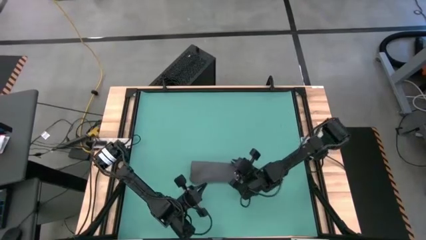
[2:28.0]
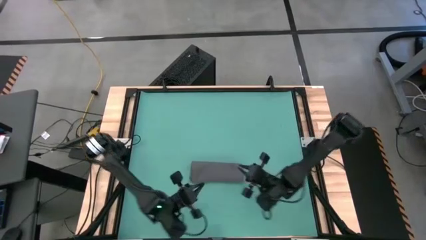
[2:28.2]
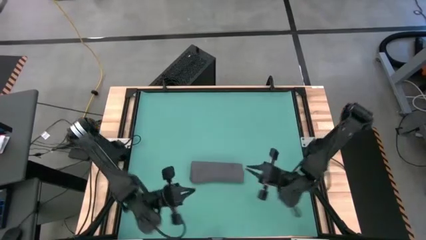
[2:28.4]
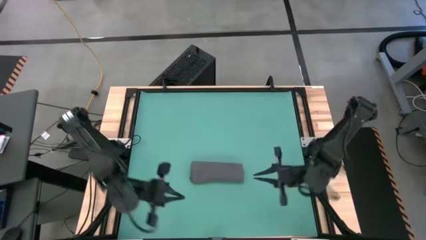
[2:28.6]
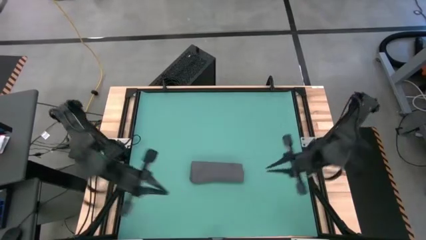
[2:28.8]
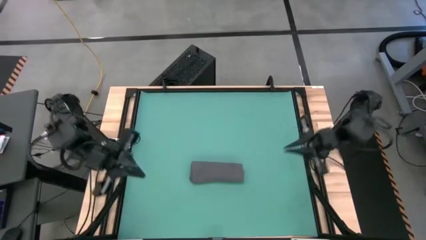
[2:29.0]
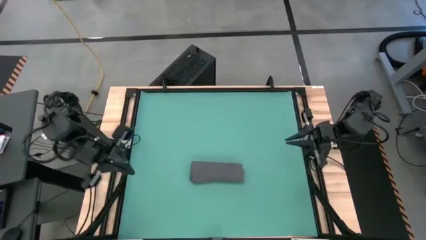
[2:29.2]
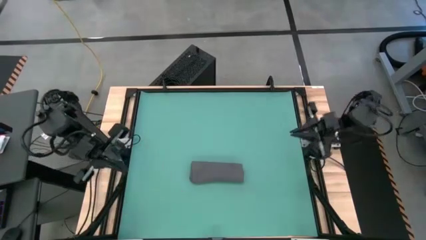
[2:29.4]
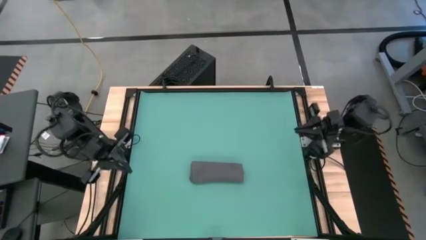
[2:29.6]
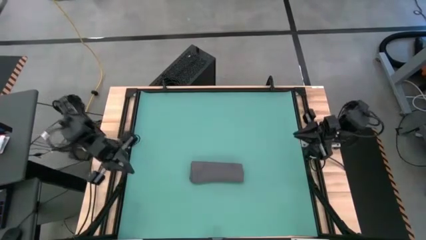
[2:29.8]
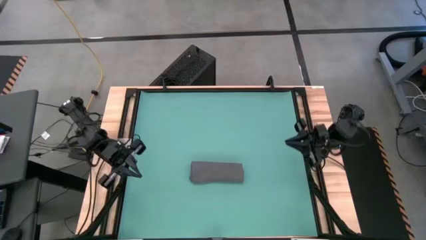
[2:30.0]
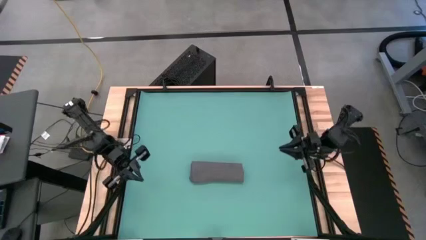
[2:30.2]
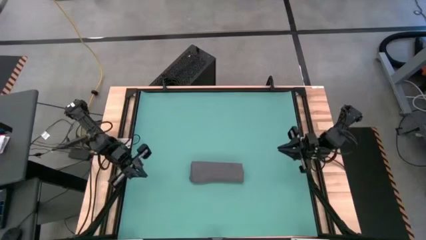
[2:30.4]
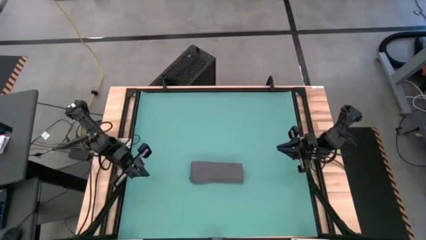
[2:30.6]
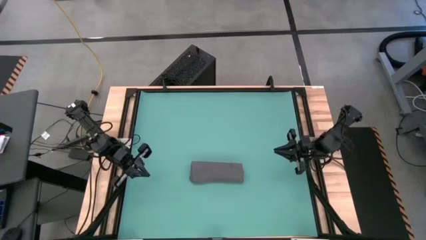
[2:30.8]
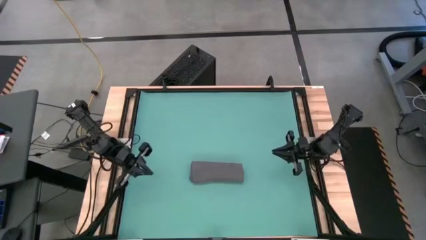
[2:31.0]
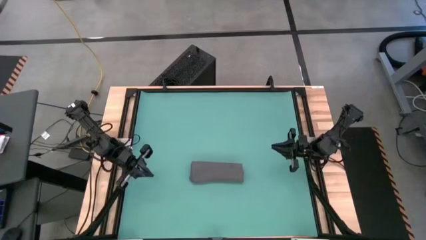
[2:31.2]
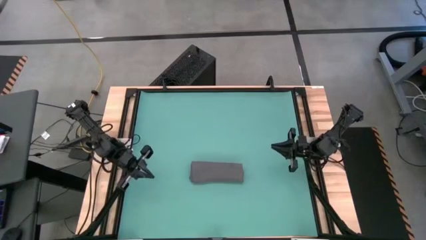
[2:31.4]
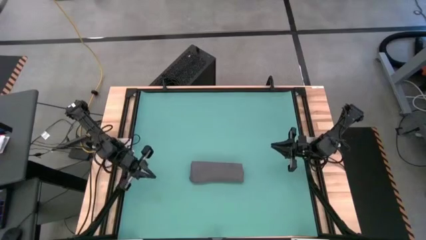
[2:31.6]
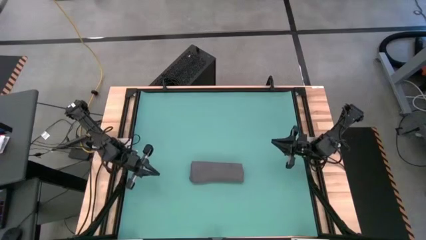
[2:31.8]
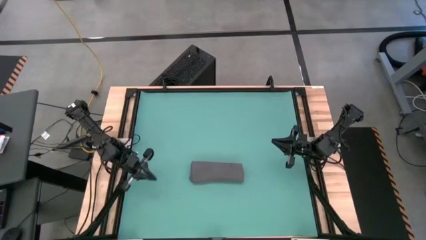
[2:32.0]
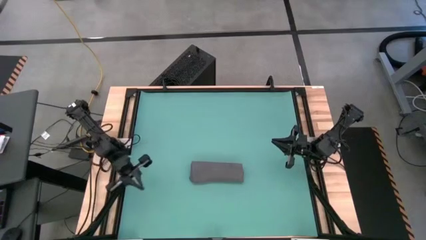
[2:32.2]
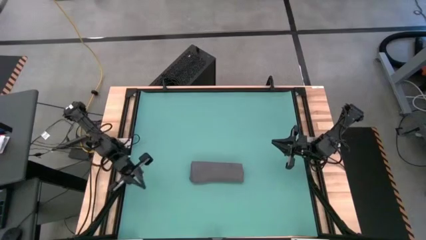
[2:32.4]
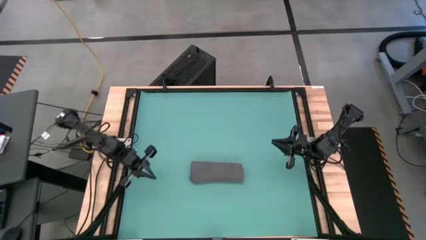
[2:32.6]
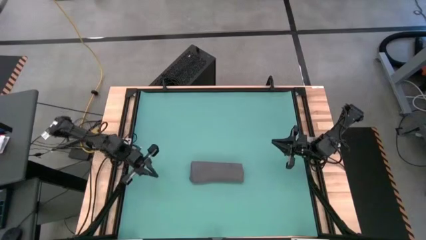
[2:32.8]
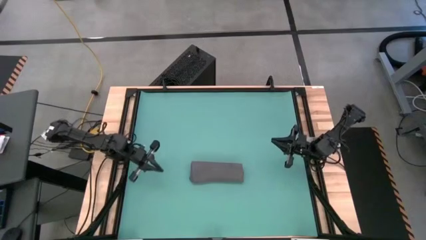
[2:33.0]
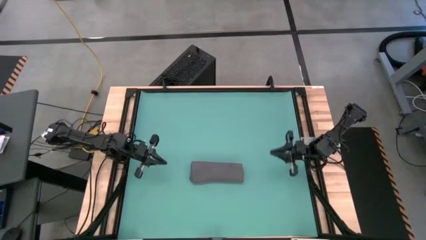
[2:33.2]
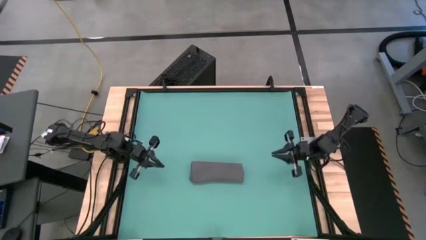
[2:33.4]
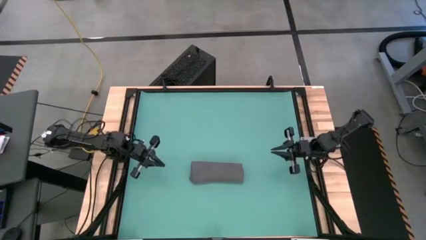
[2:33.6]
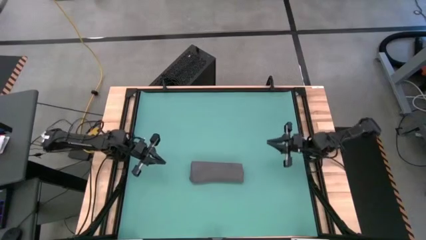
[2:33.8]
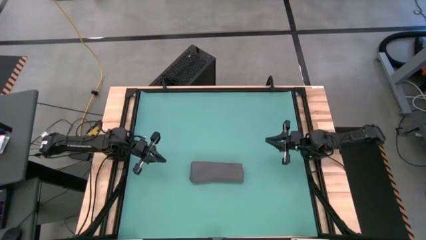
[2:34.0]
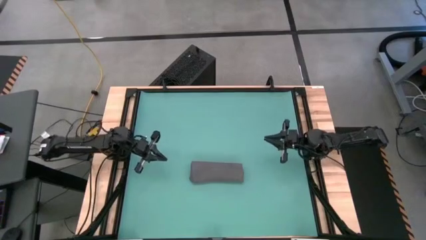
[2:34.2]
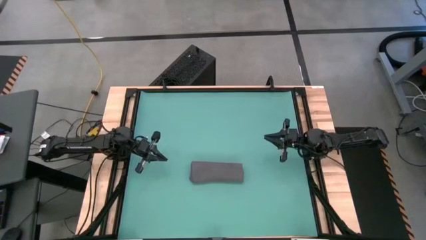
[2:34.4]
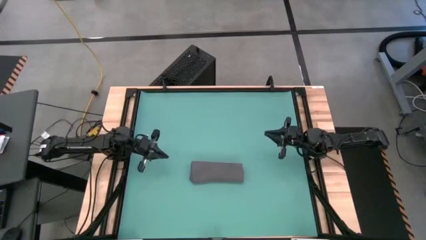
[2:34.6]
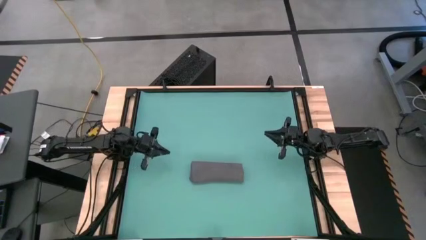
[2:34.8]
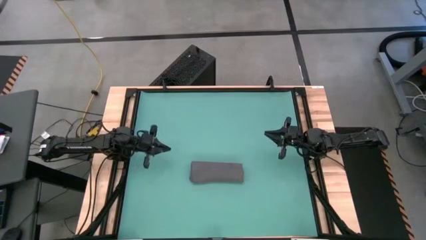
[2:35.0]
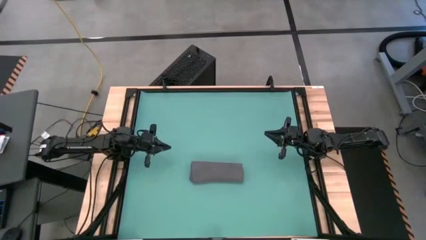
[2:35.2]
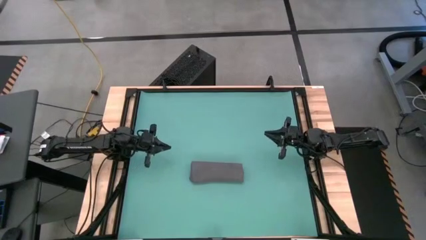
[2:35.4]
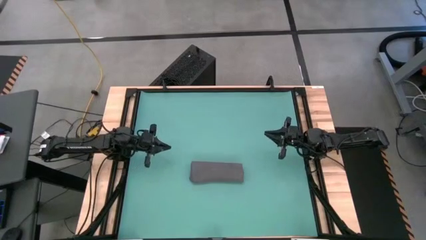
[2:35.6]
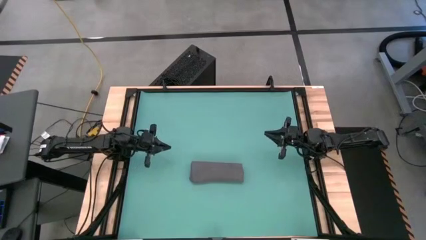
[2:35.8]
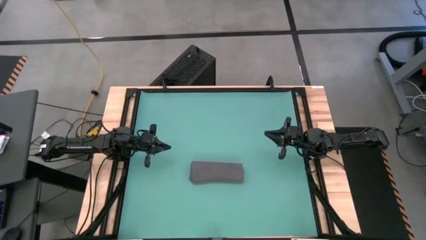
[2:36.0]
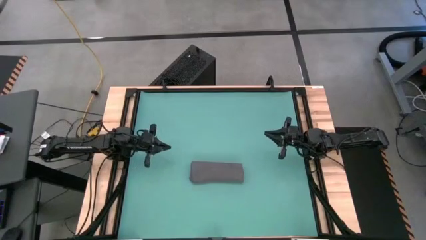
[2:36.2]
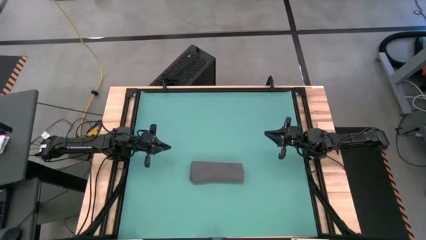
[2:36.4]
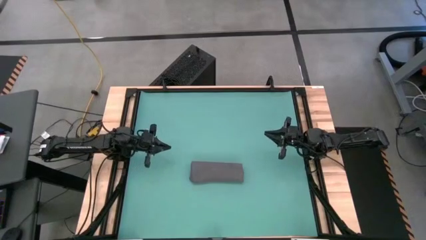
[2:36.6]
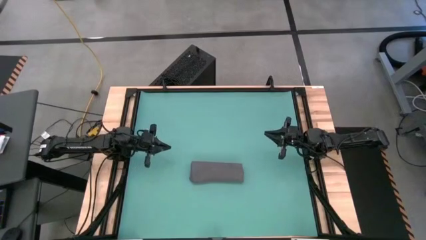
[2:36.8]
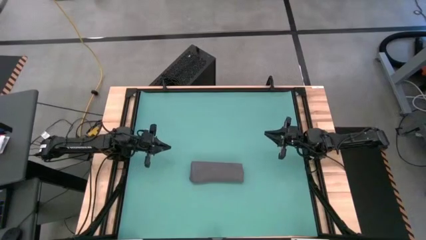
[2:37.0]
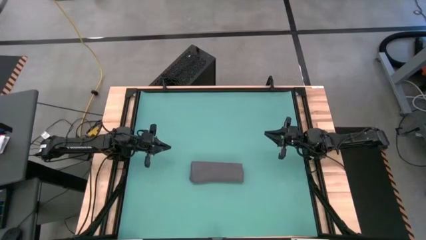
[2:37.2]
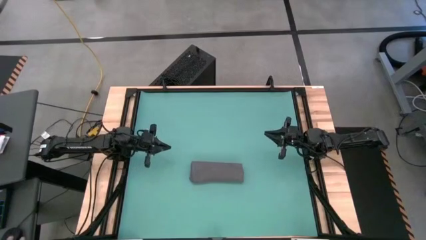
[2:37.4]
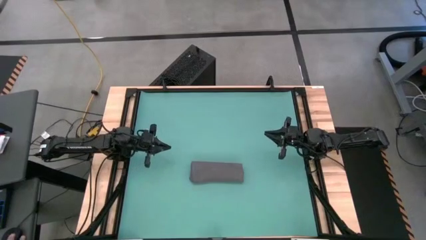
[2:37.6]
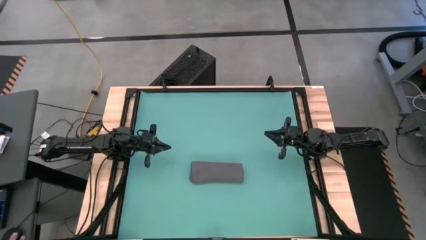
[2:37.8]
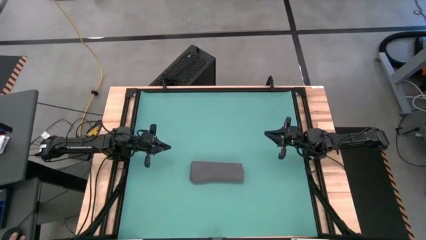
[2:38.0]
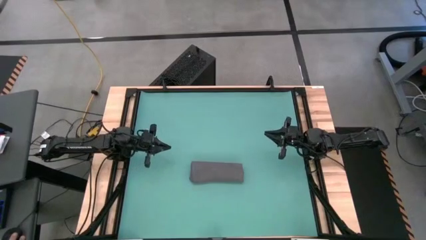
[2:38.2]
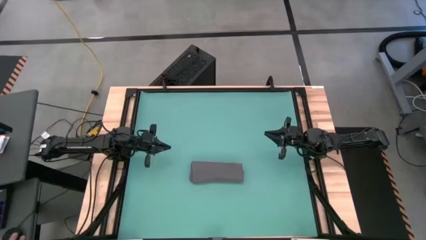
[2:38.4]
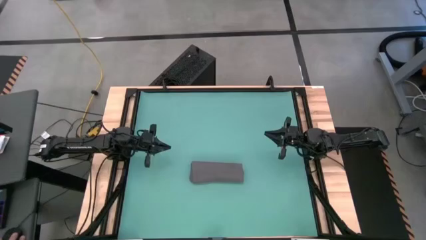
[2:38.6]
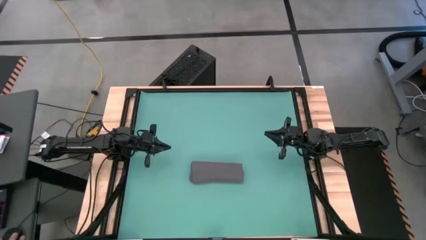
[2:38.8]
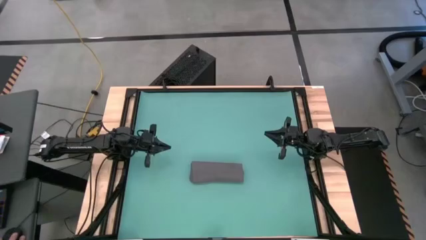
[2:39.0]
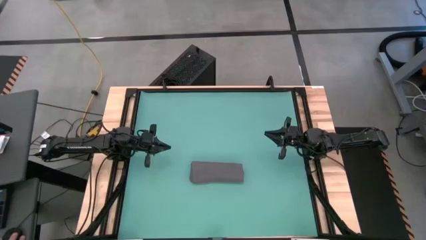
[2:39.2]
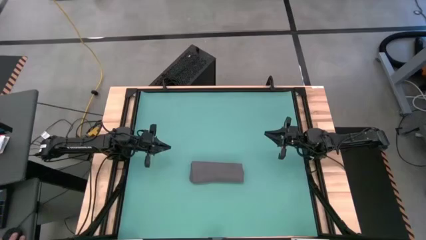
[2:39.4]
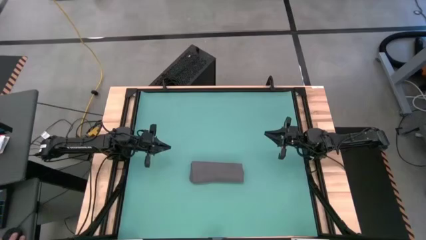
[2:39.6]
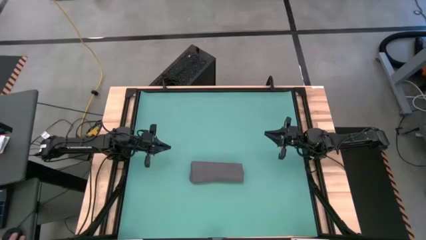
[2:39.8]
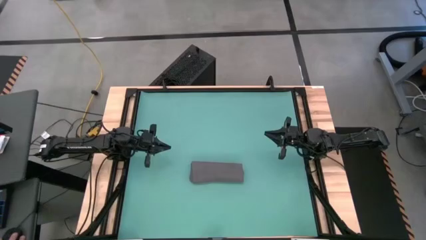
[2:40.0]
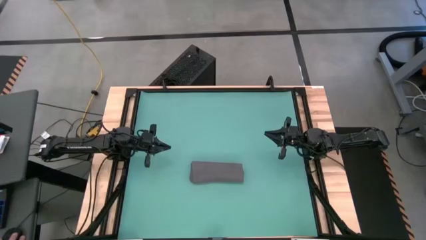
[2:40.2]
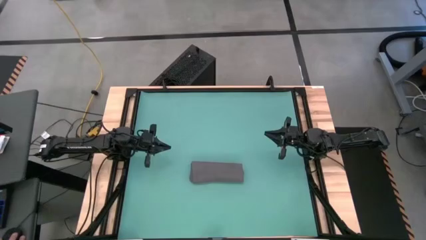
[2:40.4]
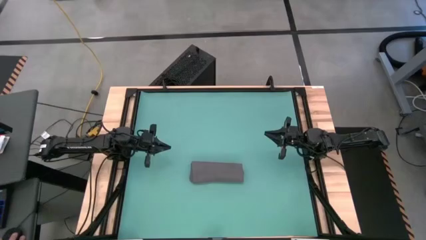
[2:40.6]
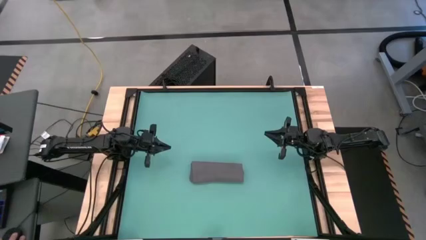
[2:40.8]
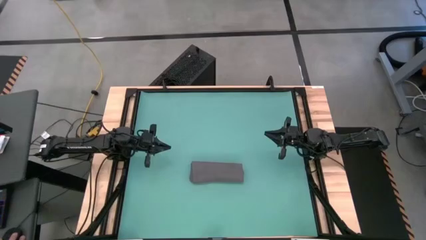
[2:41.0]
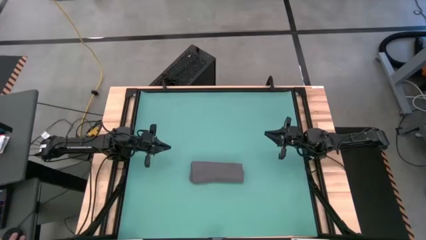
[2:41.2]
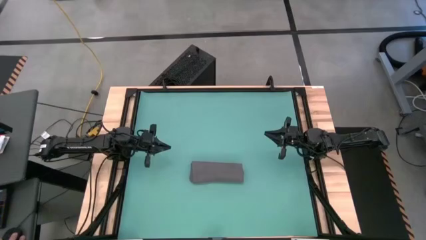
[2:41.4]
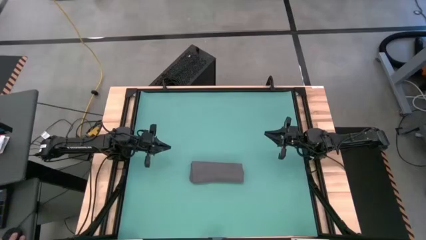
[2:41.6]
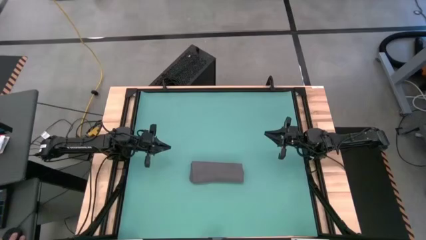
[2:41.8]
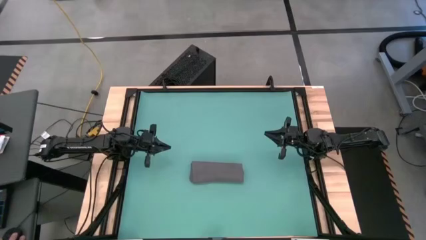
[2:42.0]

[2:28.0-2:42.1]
Task: Roll towel
Return to Home Position

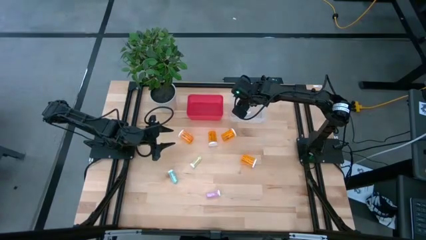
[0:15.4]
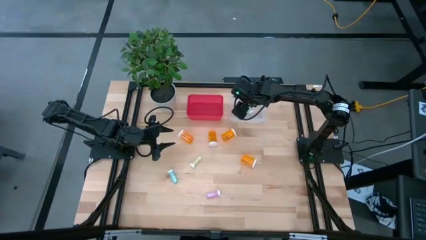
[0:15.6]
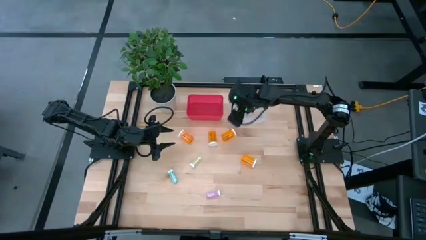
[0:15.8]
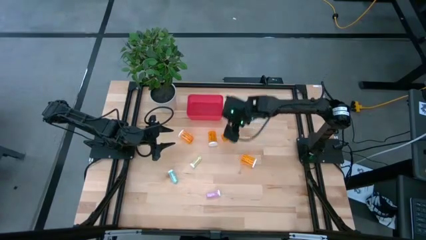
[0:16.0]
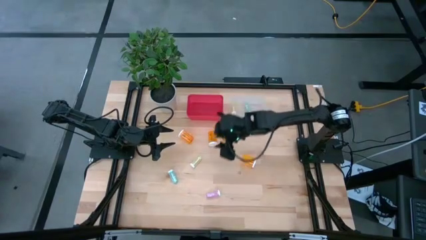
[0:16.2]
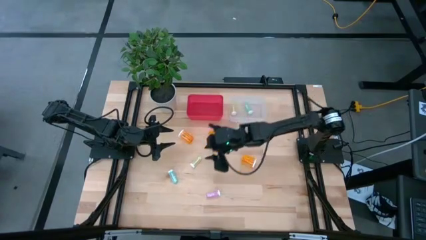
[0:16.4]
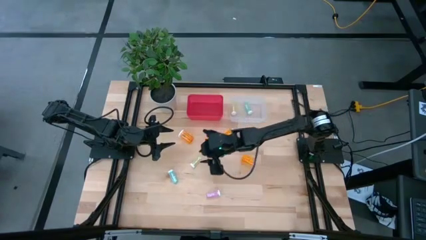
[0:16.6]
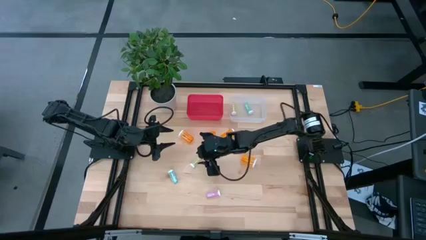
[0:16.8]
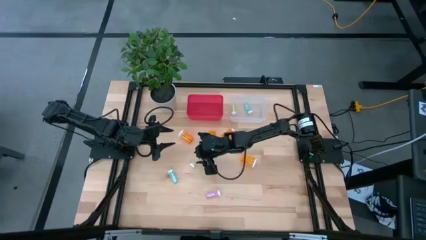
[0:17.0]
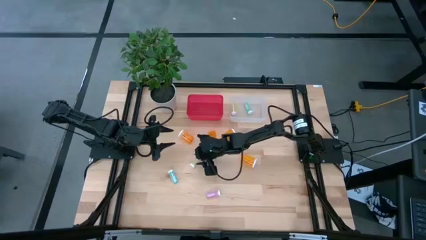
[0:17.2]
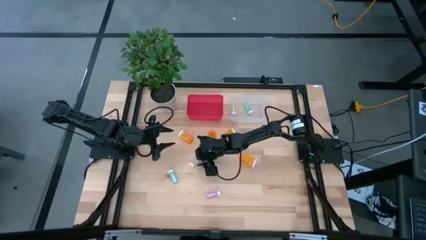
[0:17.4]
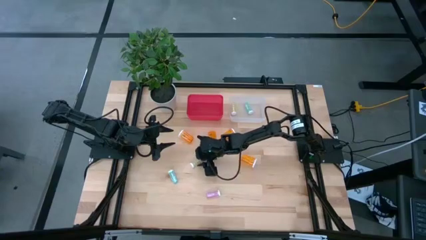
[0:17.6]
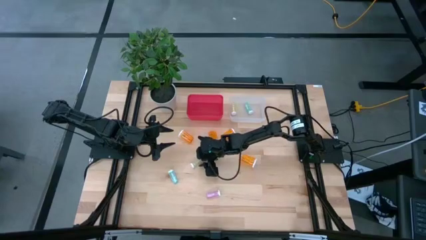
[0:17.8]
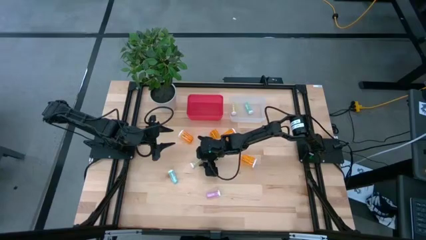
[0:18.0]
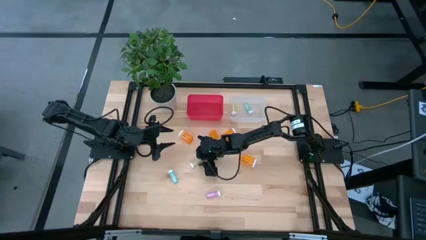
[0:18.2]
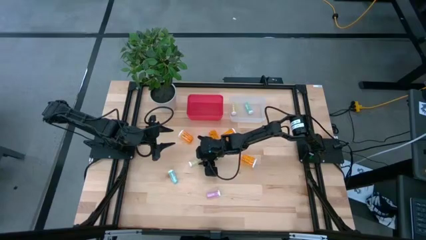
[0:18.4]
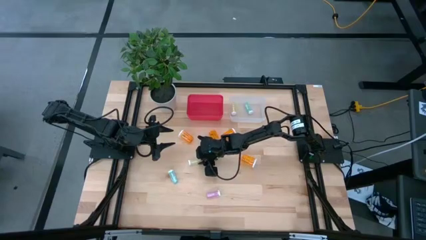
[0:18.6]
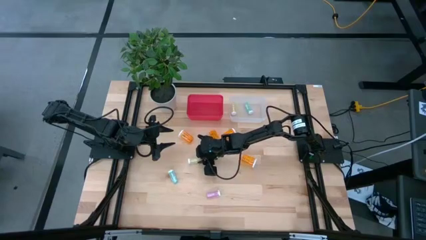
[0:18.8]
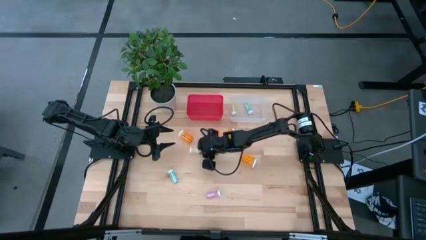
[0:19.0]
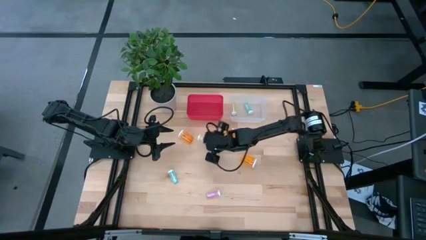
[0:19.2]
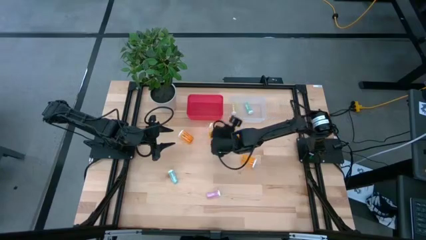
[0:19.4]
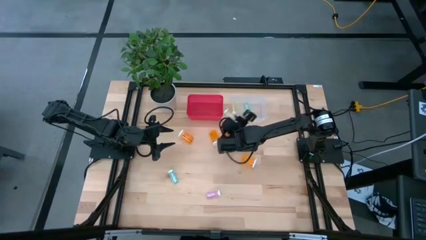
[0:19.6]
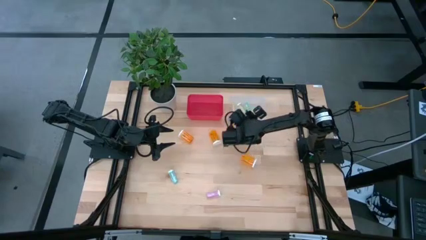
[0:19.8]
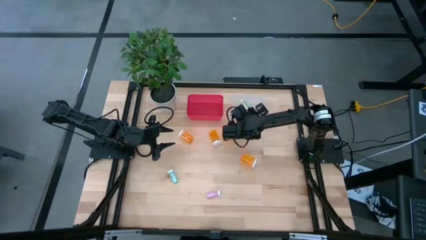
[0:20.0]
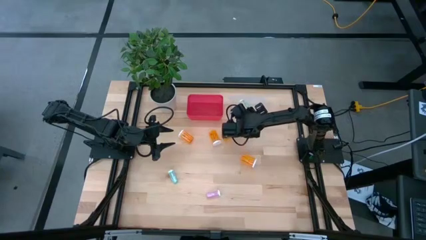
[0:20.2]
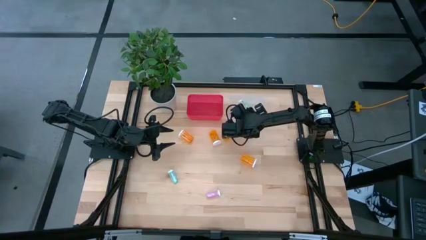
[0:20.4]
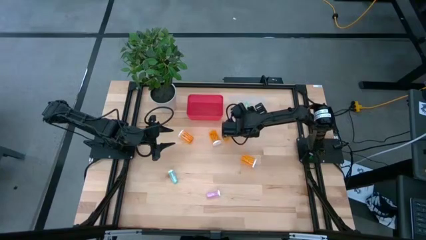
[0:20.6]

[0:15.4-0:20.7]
Task: Pick and place medicine bottles into bin by pill shape (circle, oval)
Put the green tablet bottle into the transparent bin
